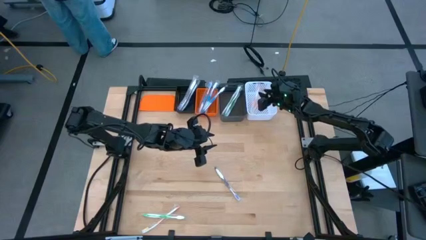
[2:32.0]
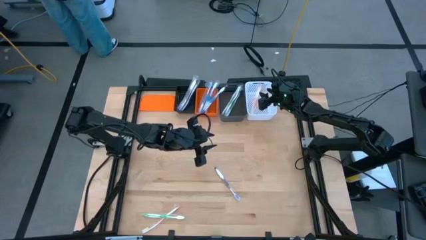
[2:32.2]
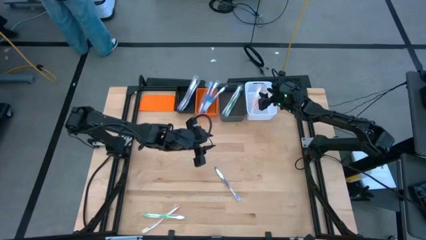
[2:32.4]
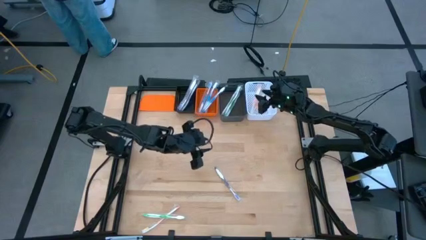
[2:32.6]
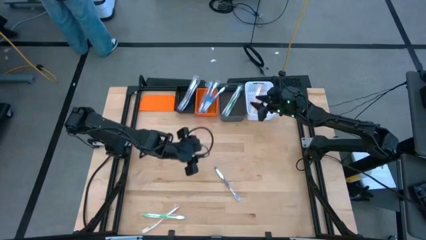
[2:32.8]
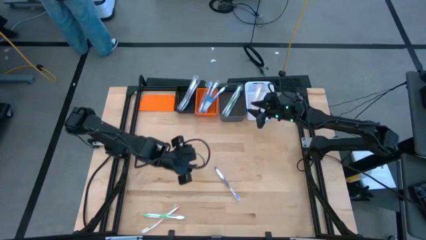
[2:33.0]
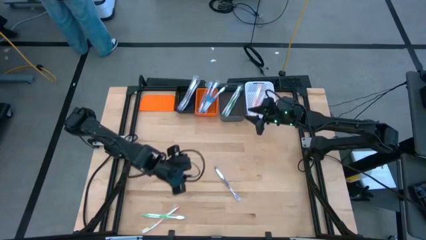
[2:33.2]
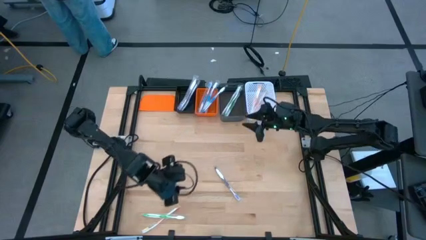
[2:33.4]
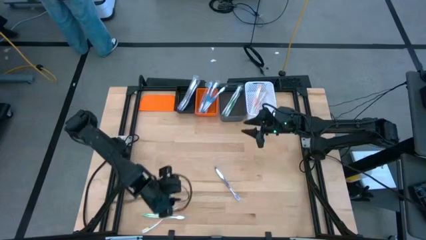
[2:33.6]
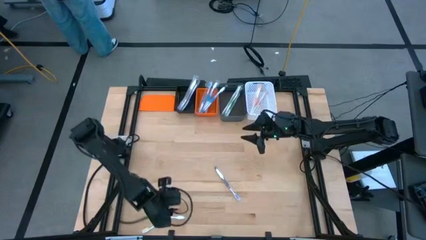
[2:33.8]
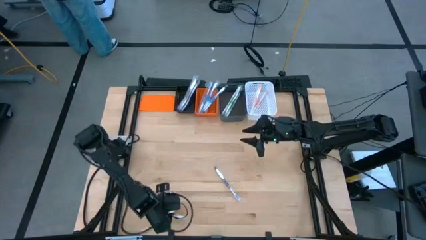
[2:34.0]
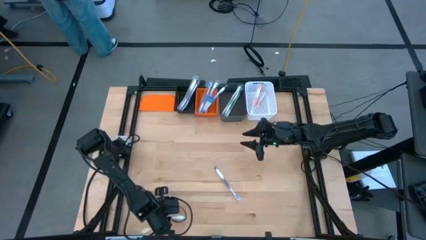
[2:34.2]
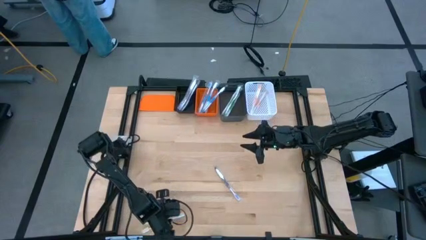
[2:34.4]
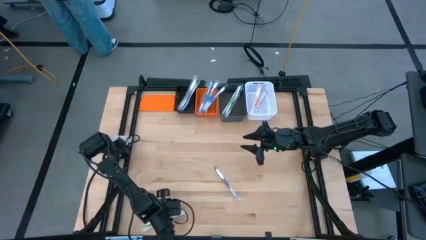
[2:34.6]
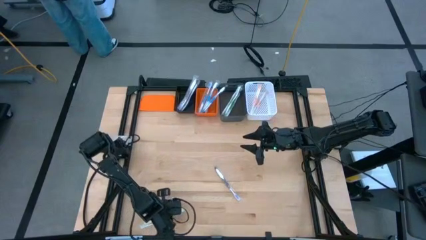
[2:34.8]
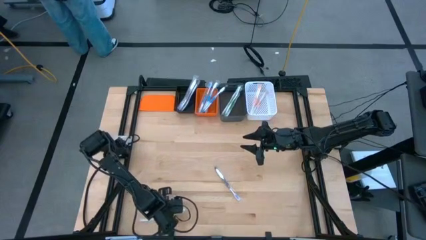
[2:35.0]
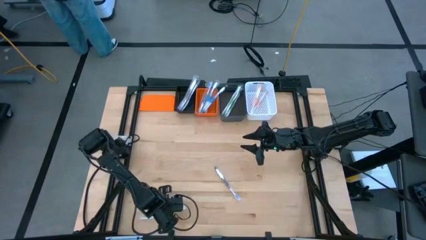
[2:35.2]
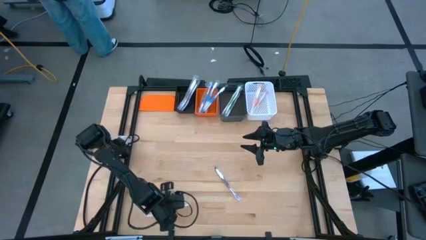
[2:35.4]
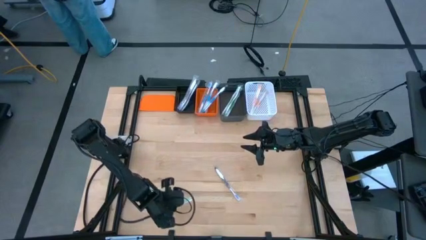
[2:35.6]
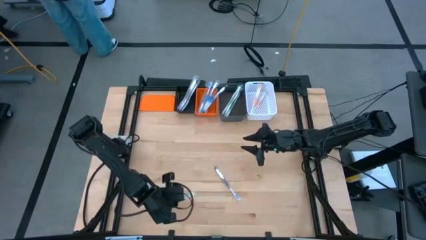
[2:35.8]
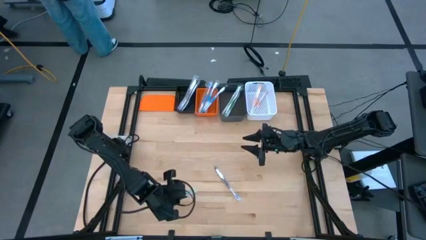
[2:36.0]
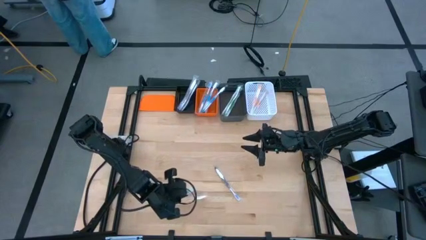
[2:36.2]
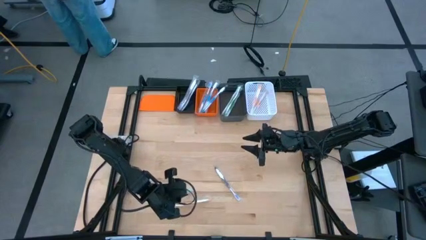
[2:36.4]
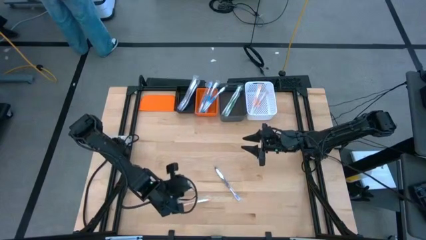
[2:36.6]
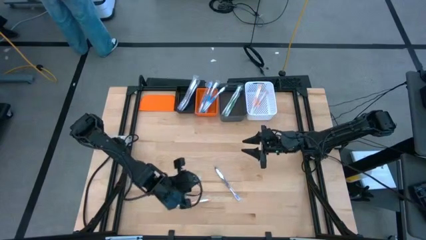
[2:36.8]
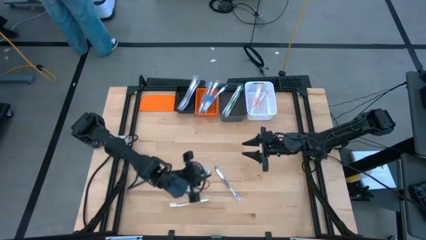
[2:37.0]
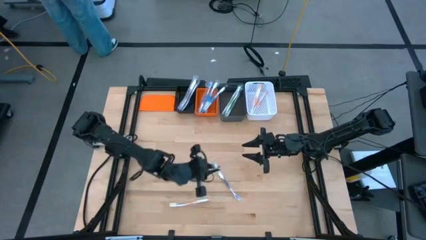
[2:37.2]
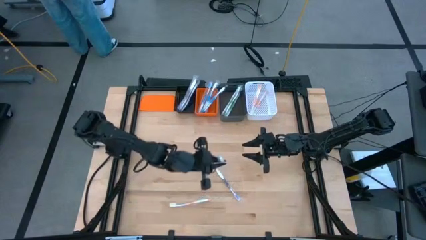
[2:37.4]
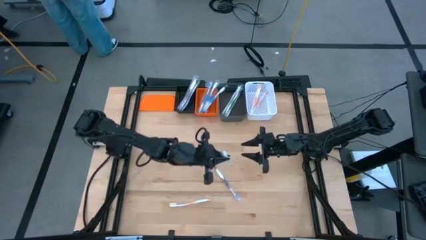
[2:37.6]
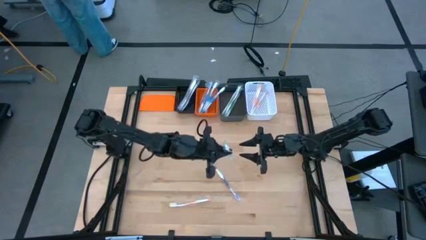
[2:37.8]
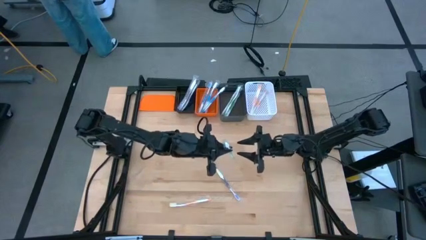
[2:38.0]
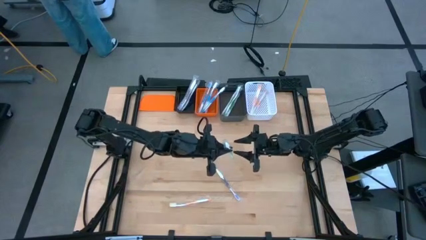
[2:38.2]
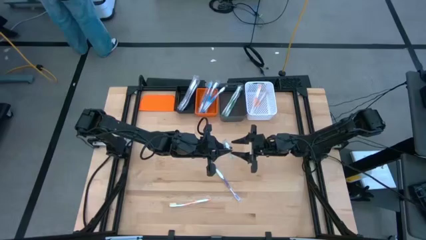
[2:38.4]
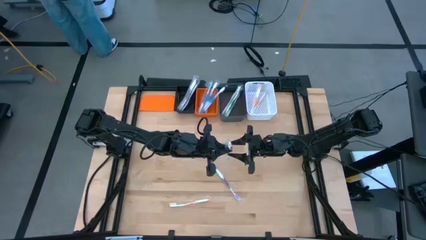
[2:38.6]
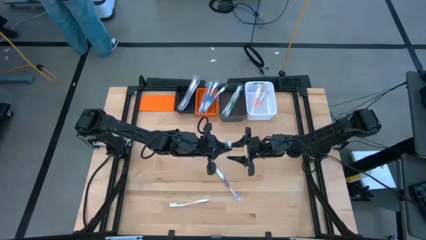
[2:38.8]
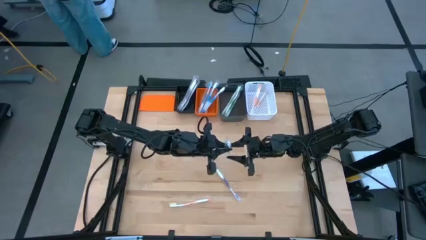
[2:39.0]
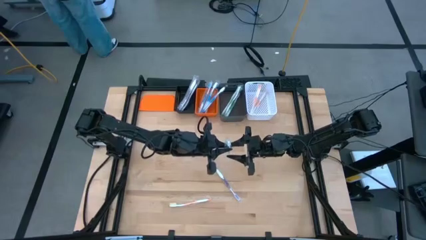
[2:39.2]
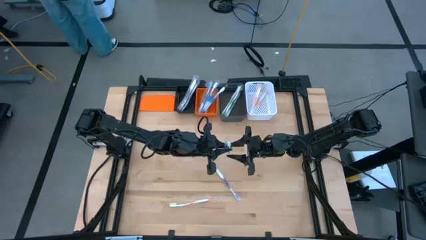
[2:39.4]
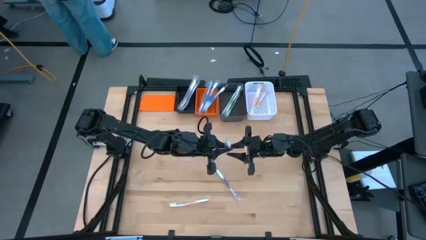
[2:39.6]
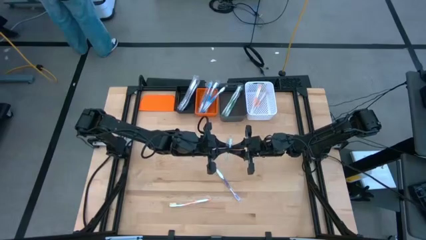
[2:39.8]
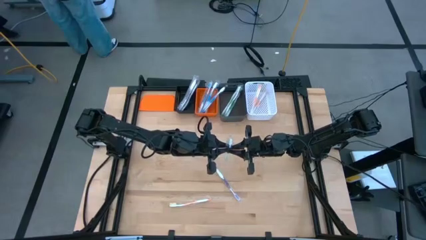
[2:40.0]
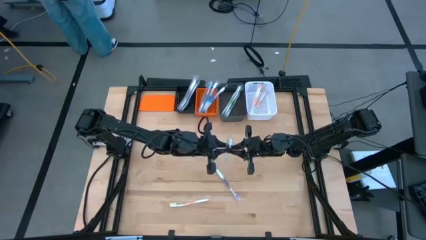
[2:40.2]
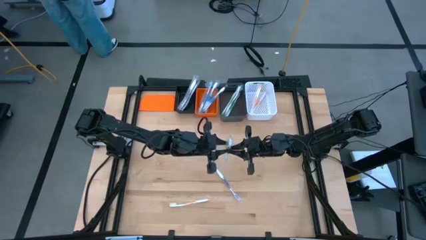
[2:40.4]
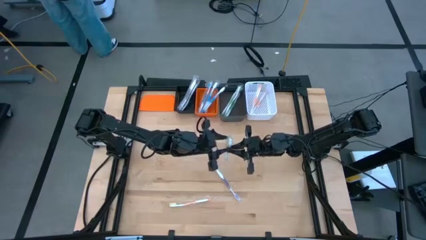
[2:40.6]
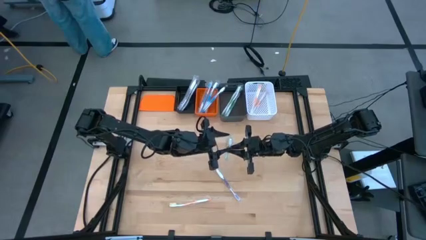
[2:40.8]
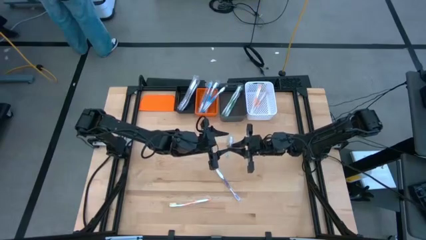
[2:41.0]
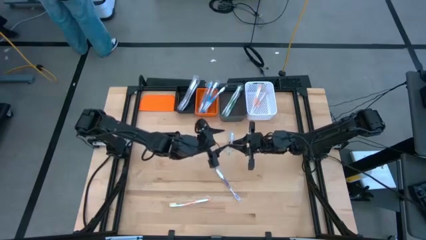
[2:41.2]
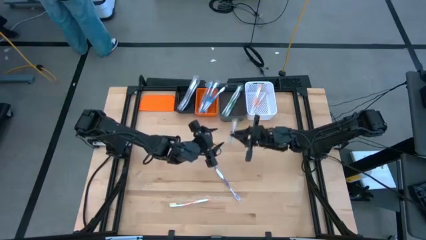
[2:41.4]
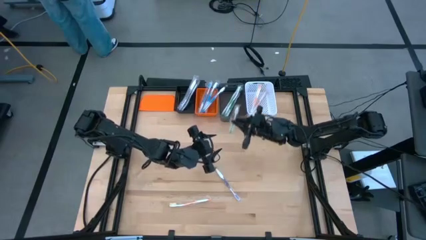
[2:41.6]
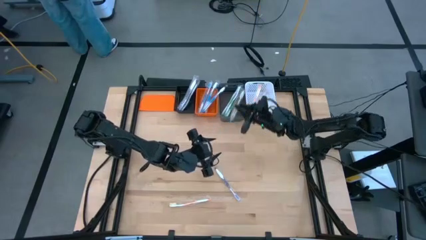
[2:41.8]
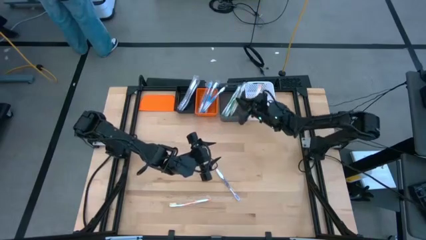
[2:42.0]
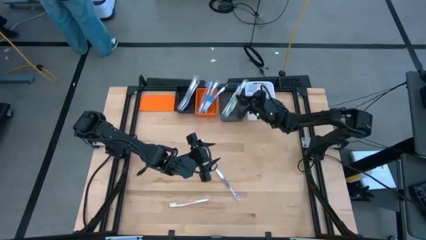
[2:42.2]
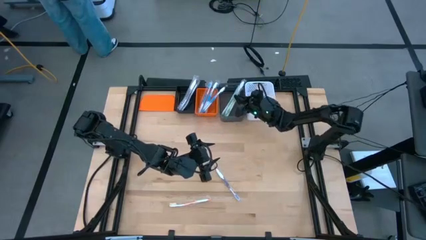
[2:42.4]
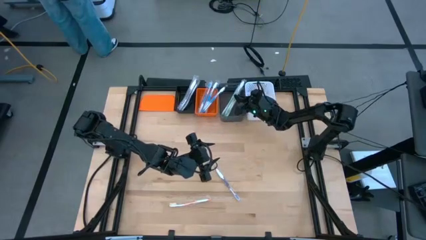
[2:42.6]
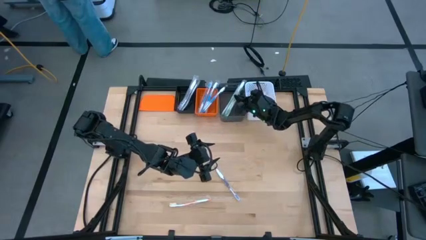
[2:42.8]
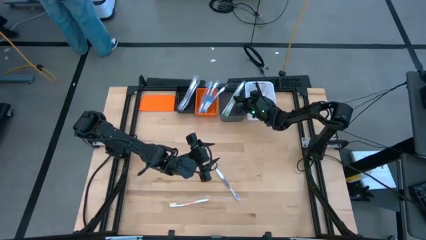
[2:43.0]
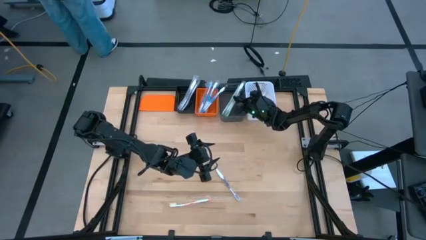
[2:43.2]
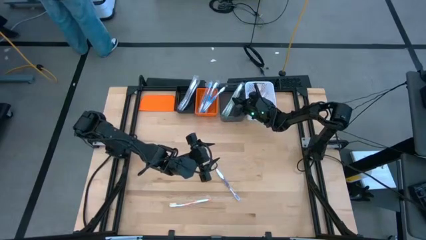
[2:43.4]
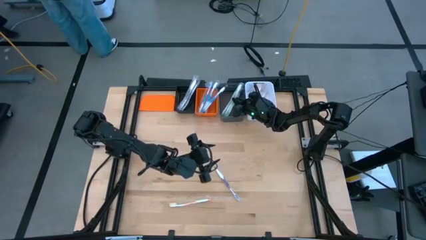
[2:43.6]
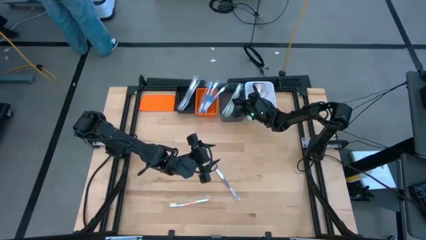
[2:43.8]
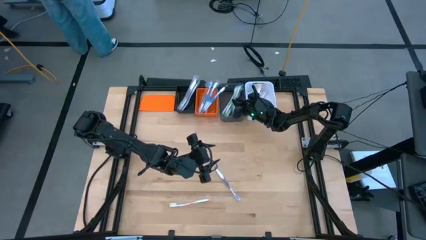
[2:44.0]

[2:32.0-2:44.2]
Task: Pick & Place Toothbrushes
Put the green toothbrush into the gray bin

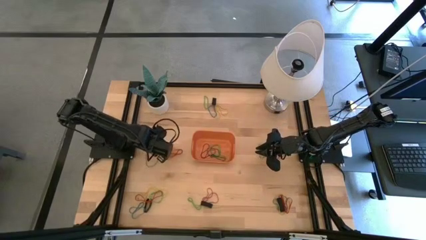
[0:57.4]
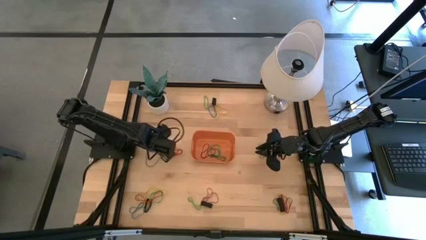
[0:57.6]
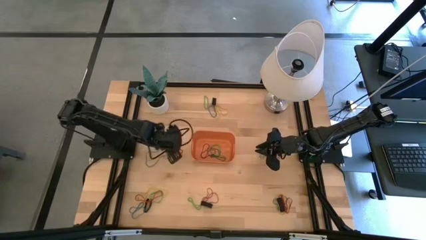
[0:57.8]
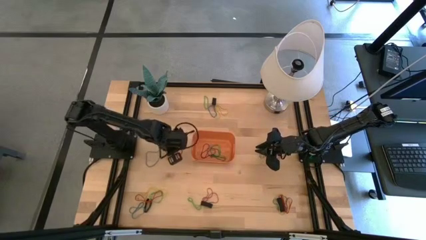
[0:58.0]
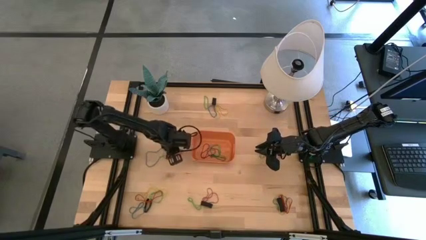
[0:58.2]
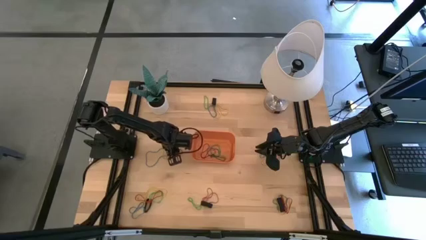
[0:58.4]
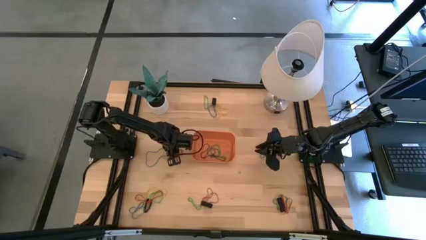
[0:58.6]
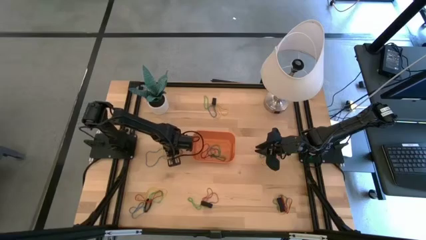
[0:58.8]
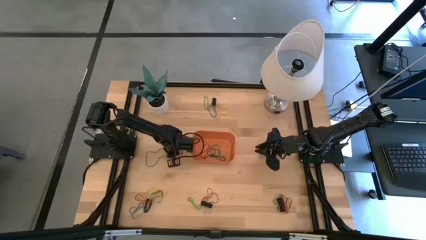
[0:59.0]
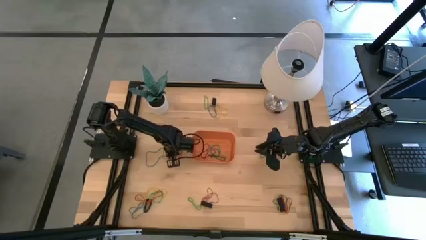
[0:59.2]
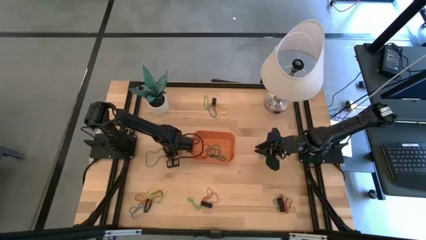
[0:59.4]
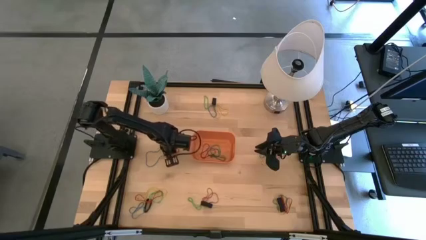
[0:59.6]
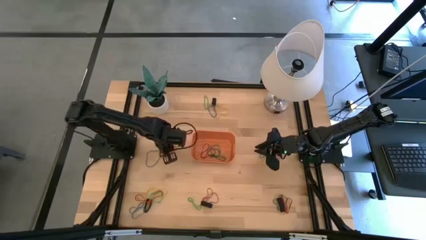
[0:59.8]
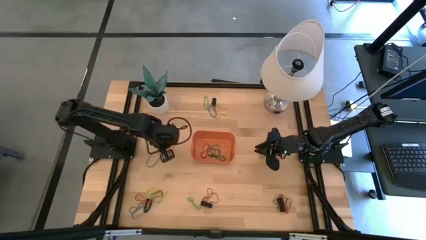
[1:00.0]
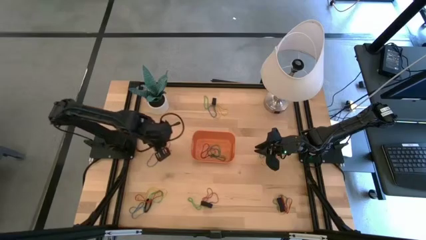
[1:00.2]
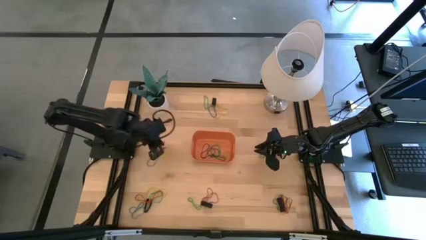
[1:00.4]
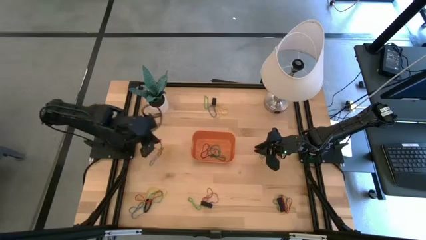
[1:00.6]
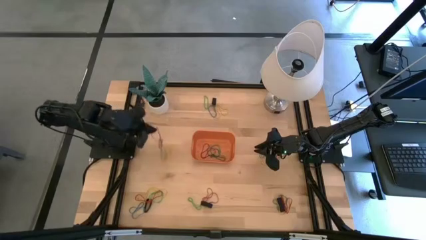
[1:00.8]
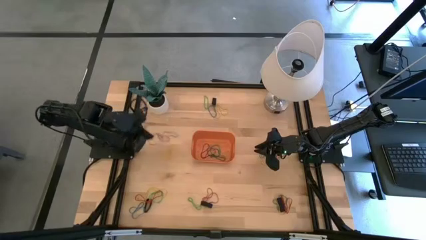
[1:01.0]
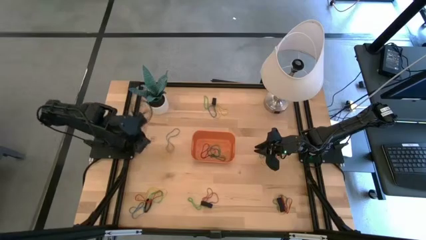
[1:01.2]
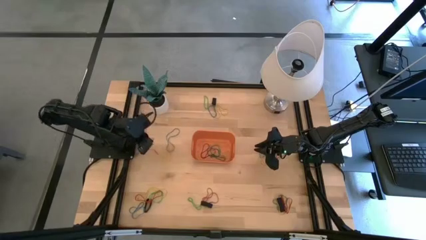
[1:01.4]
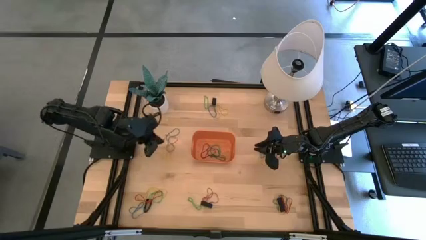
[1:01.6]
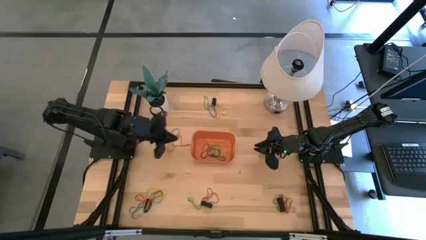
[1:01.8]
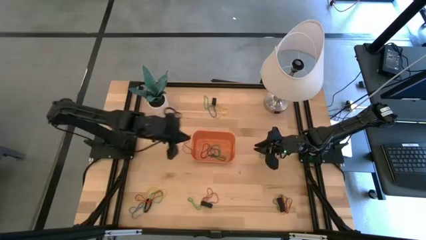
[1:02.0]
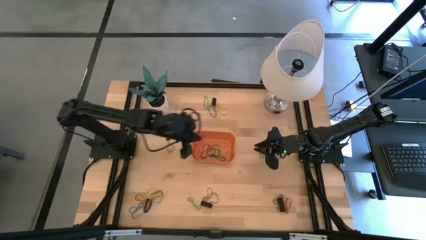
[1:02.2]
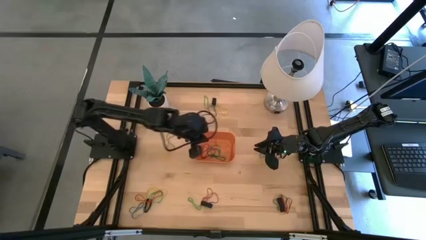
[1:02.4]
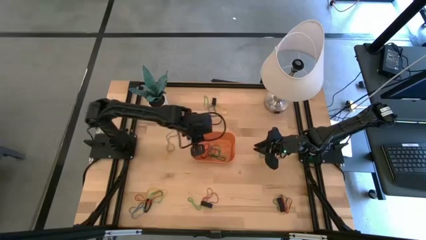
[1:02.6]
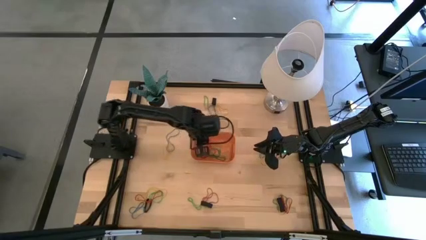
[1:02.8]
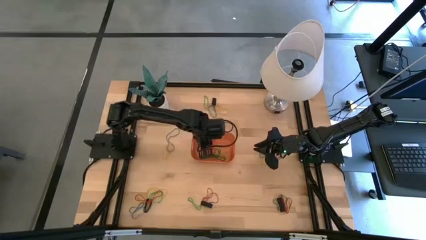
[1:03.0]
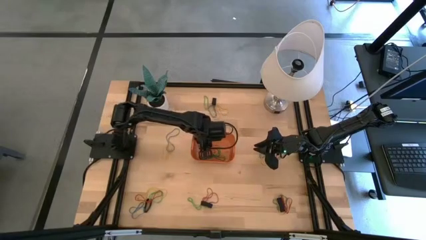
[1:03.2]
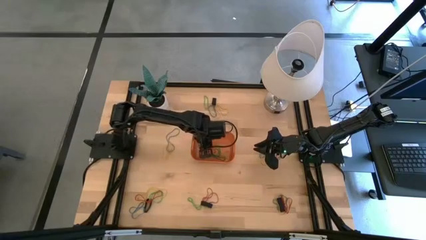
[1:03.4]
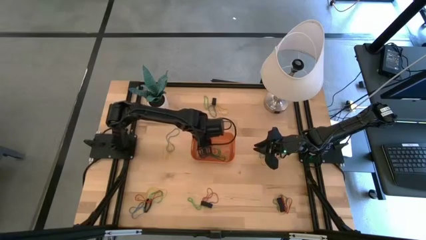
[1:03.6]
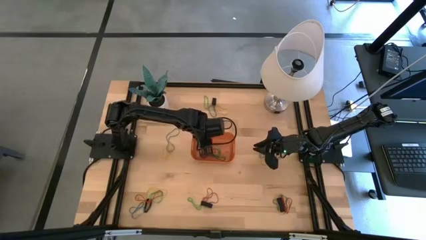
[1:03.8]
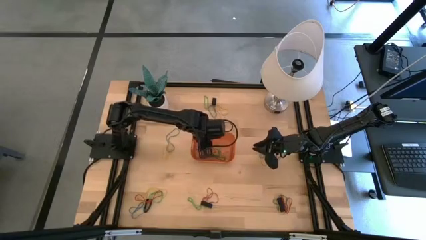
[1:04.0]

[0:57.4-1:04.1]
Task: Pick and place rubber bands into bin
Put the red rubber band into the orange bin
